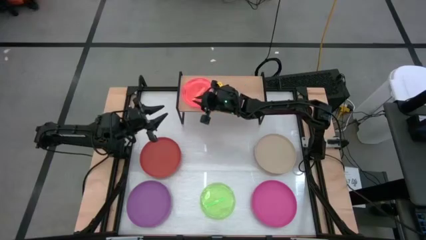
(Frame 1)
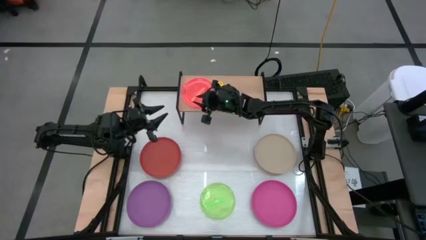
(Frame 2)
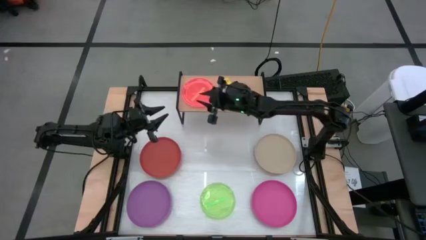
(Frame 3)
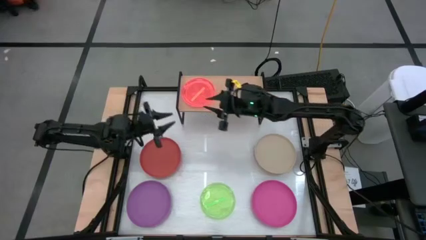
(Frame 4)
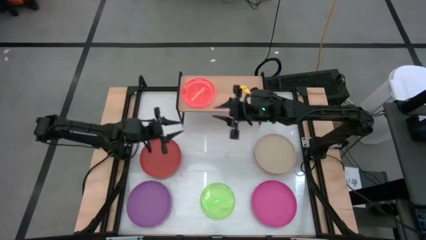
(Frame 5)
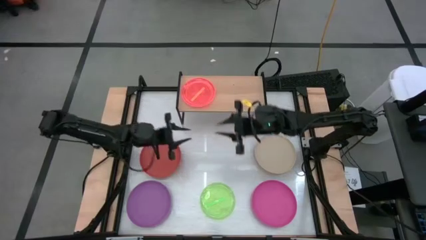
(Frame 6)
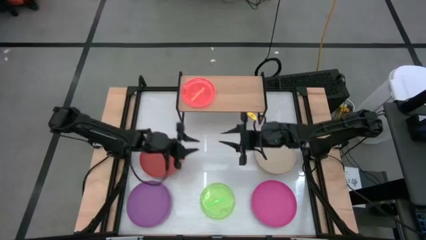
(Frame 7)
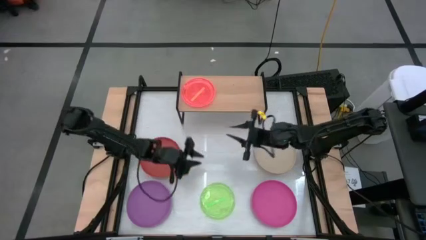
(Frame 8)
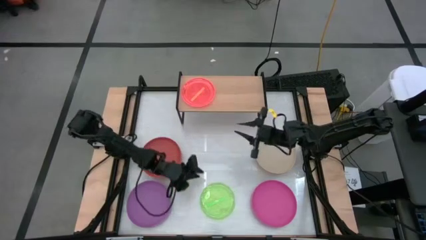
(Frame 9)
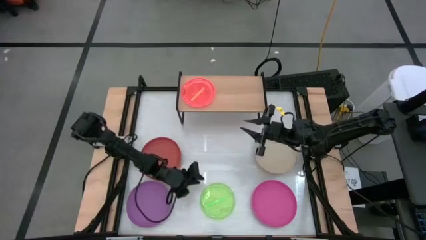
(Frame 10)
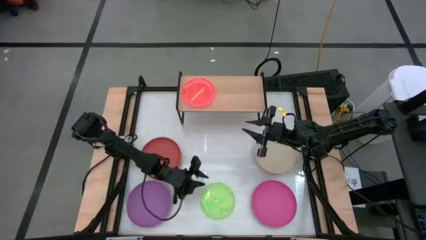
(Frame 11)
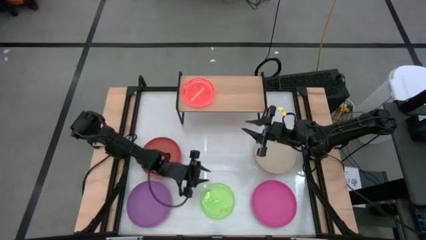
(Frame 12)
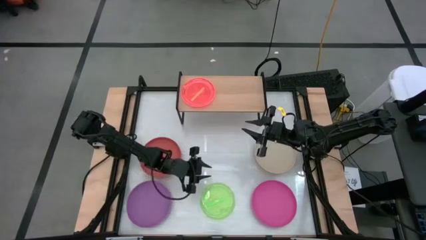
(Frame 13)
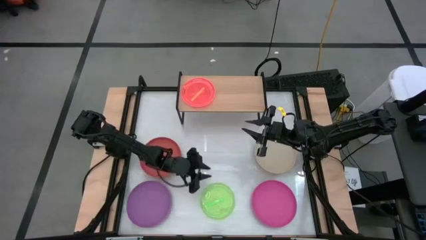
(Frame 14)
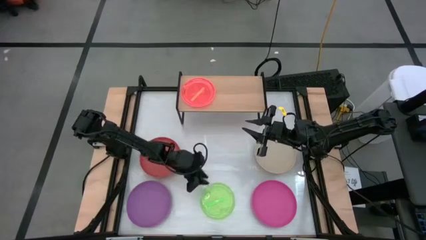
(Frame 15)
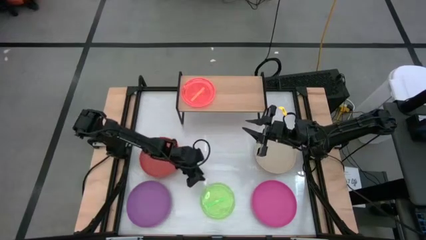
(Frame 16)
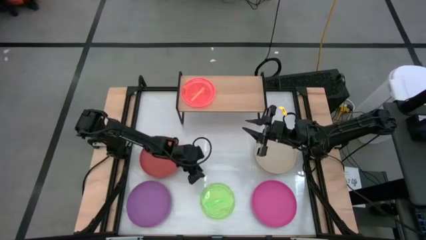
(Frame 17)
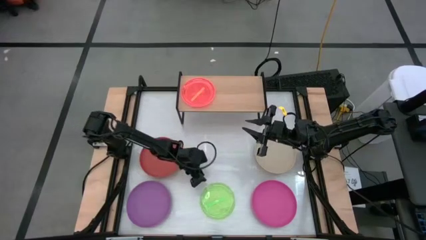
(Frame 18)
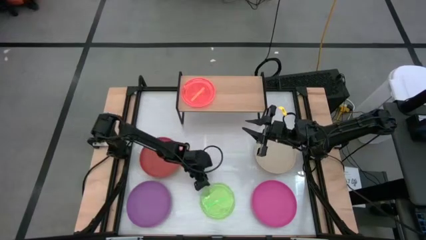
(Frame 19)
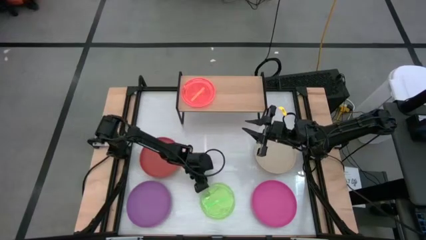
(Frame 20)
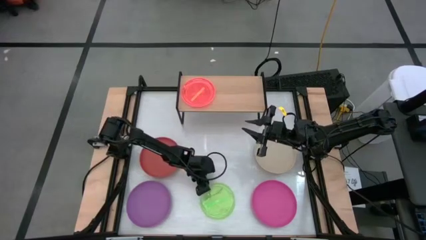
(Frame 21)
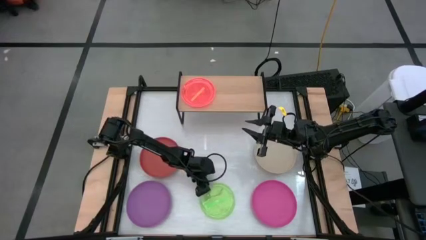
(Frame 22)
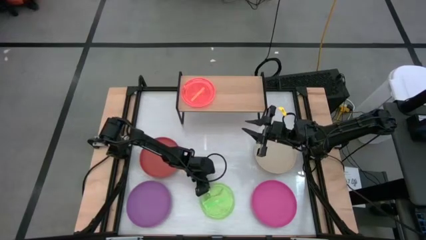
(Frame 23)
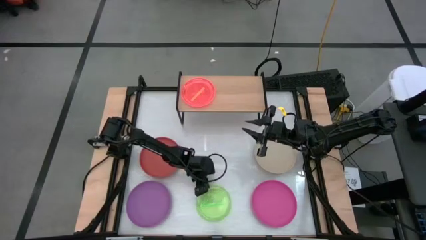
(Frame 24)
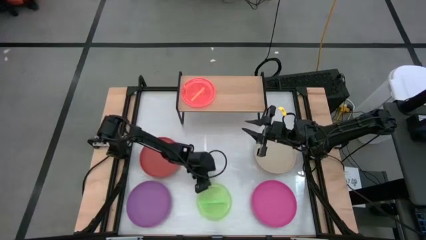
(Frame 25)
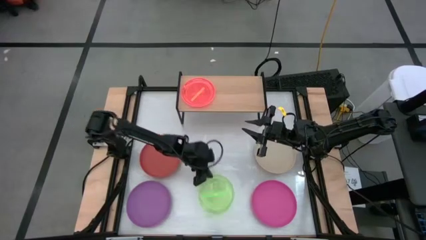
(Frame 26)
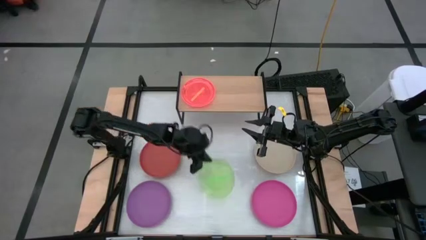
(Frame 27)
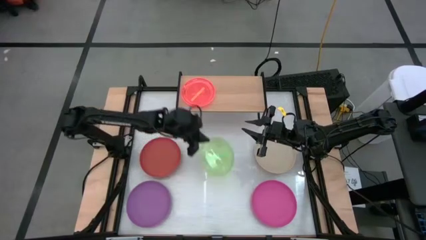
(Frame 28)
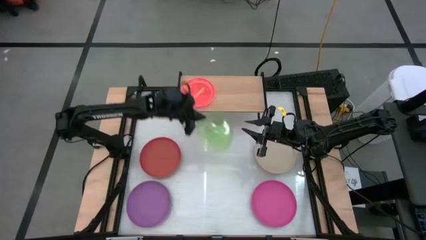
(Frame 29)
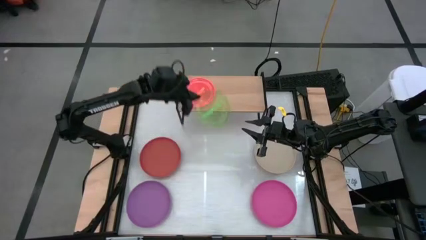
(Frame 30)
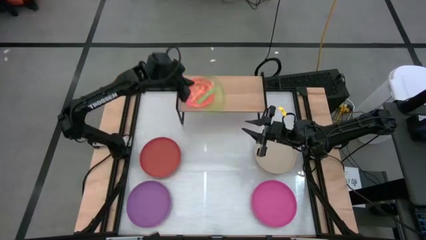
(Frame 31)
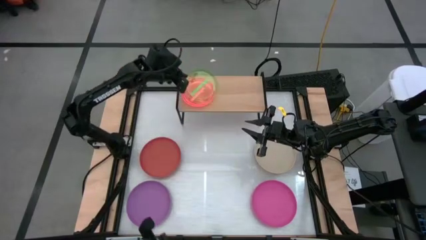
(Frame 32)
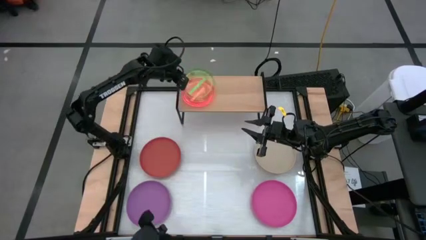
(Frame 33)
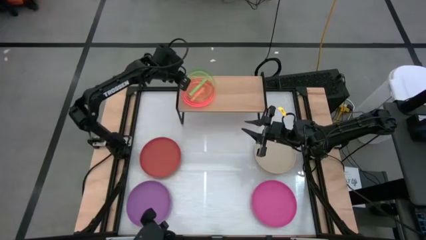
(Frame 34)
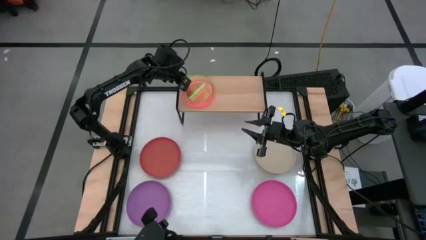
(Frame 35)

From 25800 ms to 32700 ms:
Task: Place and stack plates onto a shelf
Stack the small green plate on top of the small orange plate on the shelf

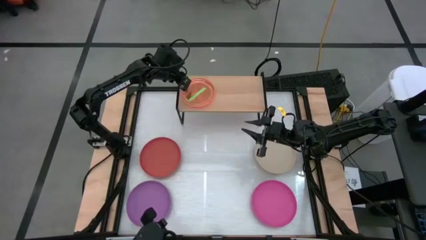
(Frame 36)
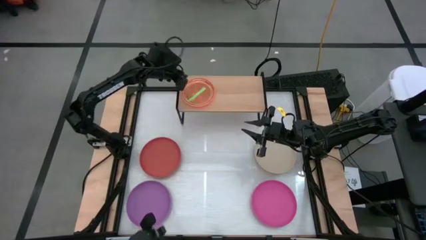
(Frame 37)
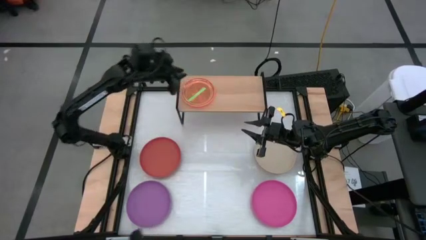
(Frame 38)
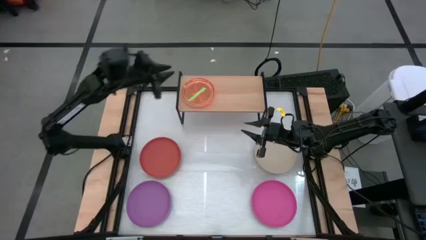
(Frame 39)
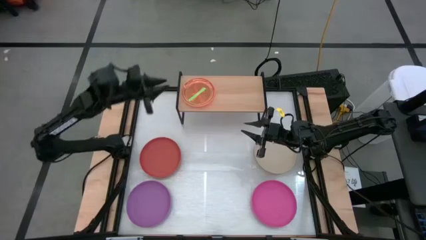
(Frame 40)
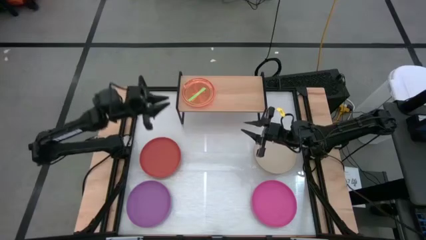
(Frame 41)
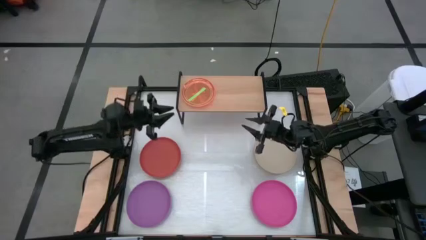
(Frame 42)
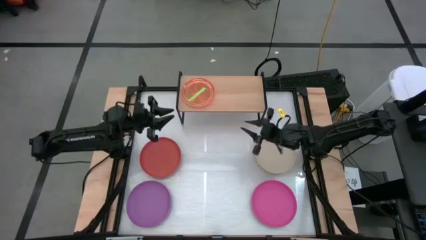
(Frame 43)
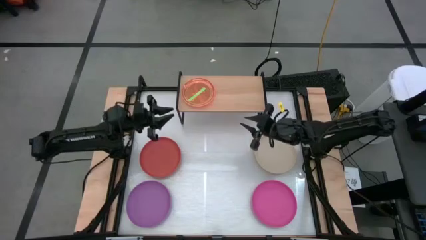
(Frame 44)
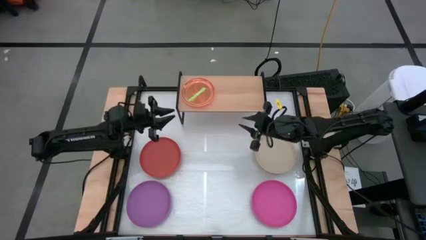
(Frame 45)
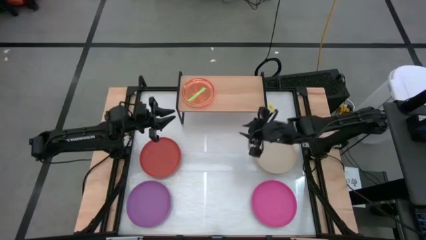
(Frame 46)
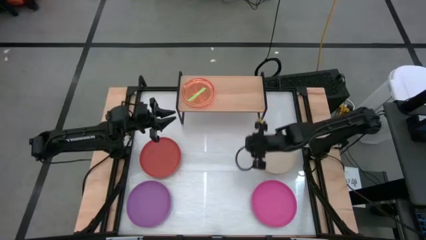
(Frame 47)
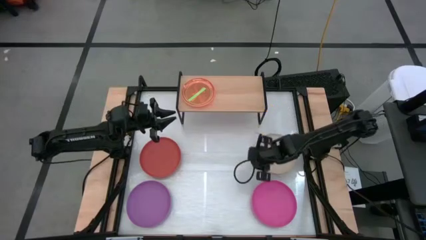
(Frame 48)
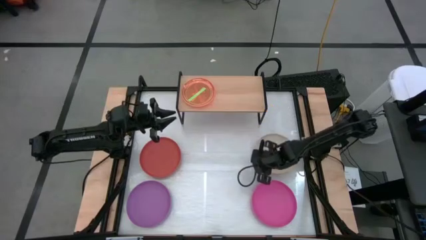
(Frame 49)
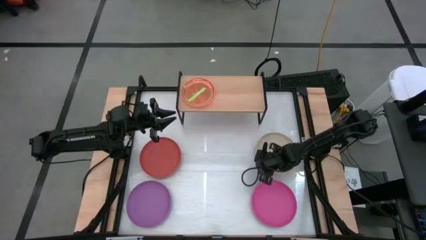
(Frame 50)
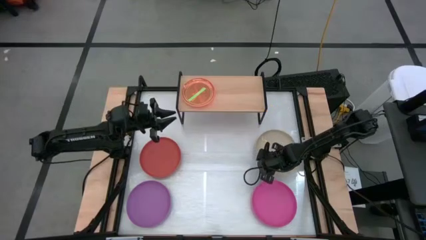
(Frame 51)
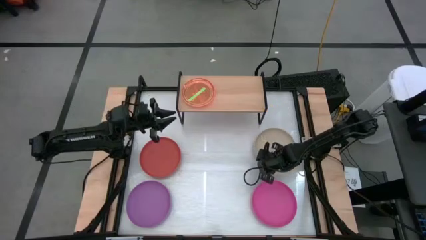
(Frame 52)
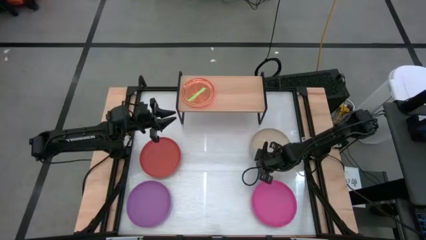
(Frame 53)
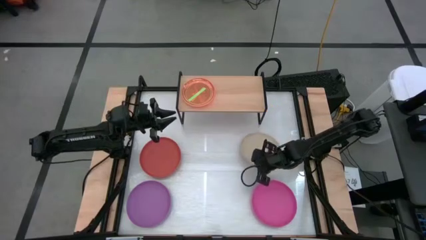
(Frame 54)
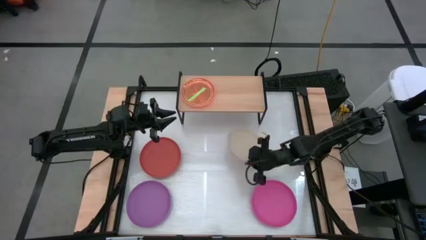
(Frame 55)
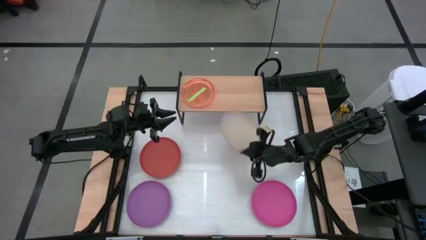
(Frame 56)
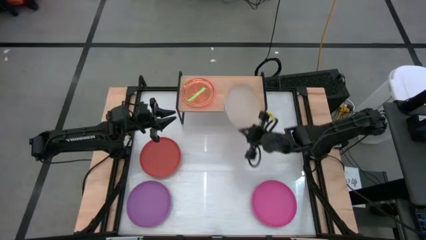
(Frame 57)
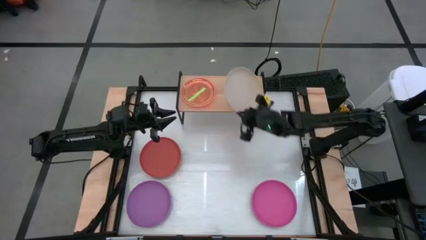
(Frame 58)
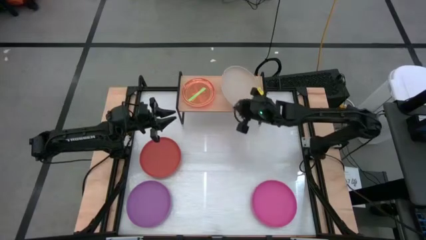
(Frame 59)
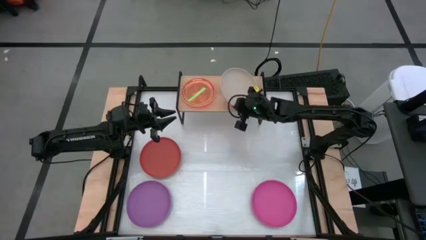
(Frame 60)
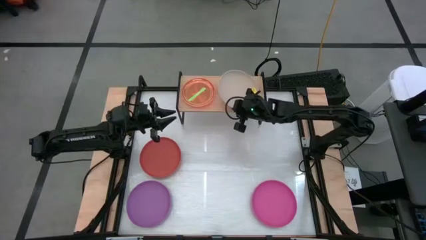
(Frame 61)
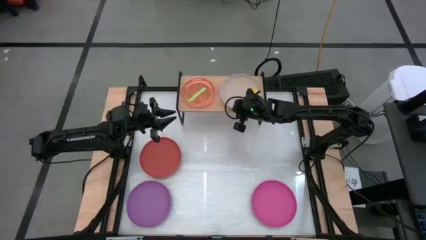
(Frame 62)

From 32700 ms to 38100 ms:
Put the big brown plate on the shelf

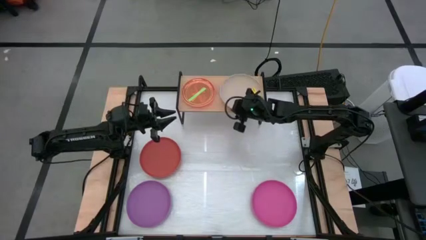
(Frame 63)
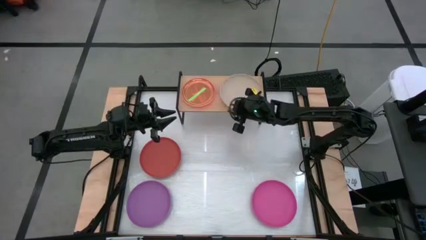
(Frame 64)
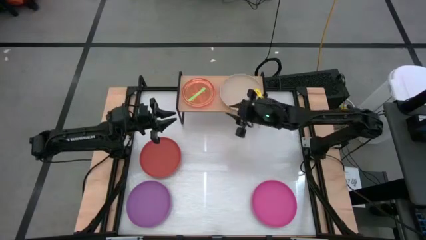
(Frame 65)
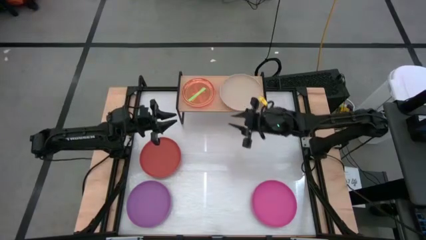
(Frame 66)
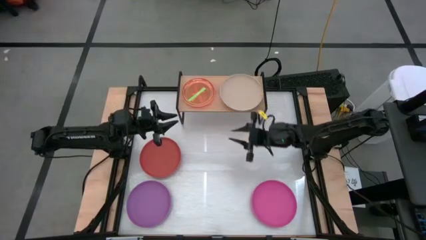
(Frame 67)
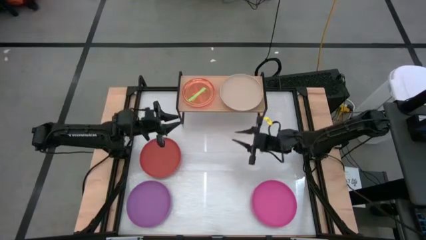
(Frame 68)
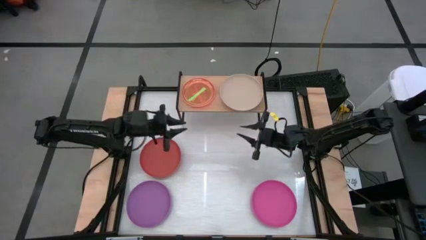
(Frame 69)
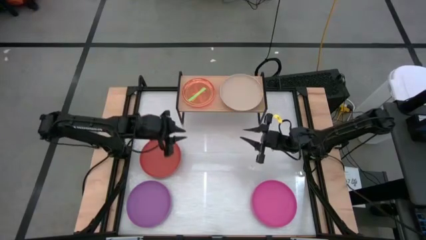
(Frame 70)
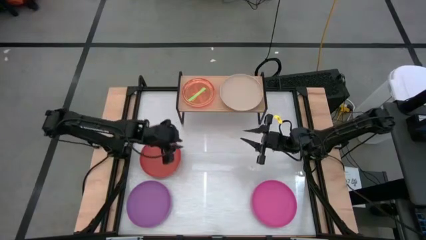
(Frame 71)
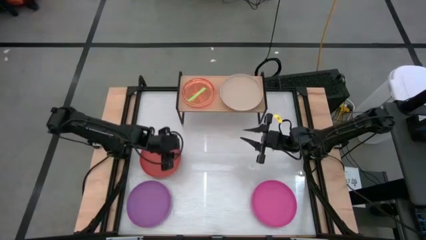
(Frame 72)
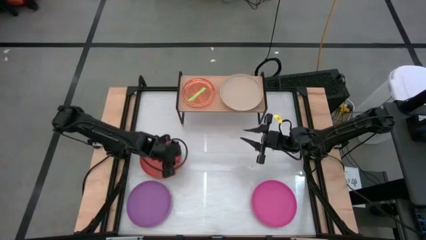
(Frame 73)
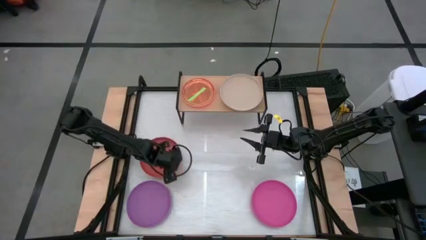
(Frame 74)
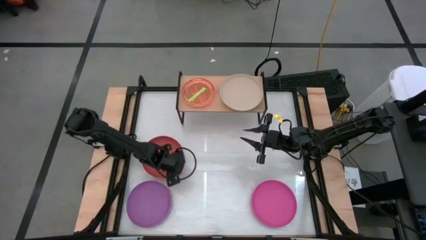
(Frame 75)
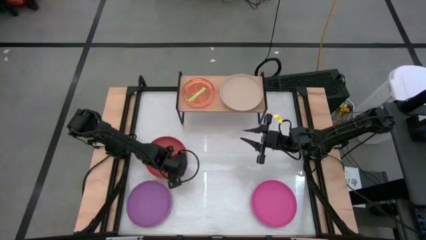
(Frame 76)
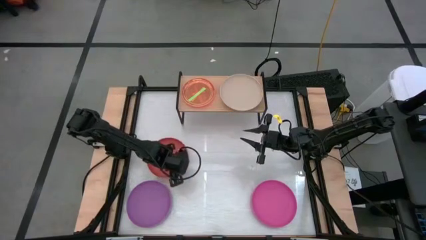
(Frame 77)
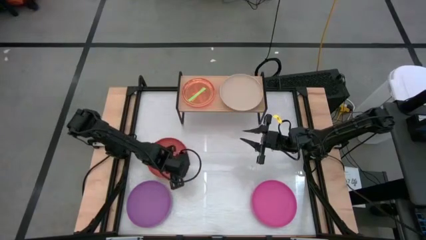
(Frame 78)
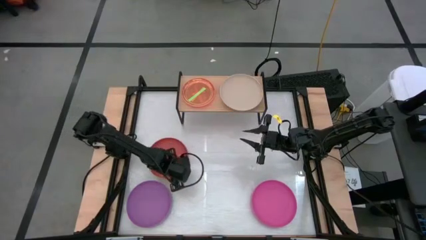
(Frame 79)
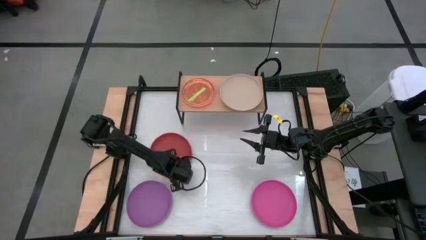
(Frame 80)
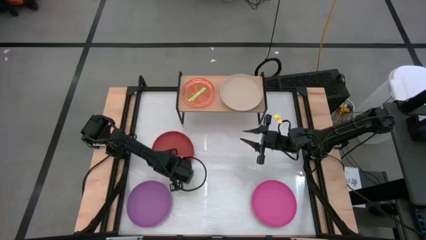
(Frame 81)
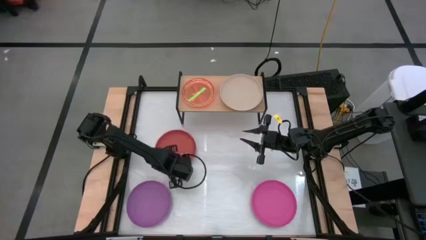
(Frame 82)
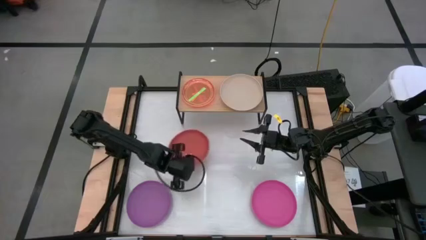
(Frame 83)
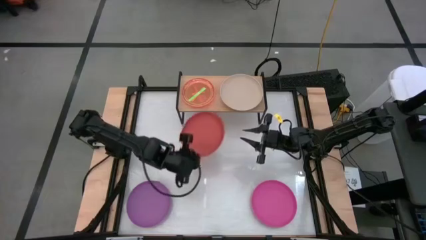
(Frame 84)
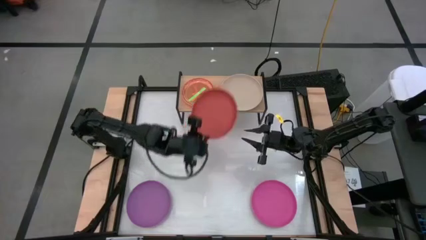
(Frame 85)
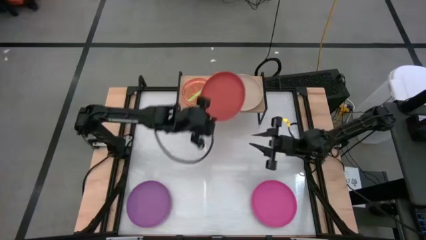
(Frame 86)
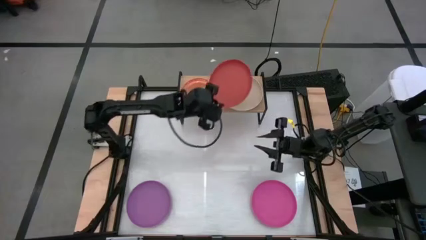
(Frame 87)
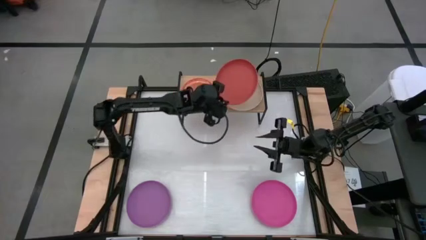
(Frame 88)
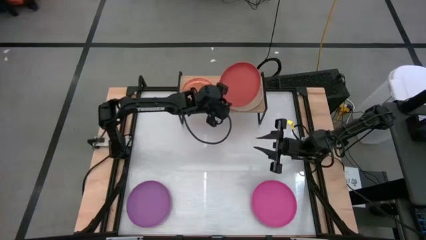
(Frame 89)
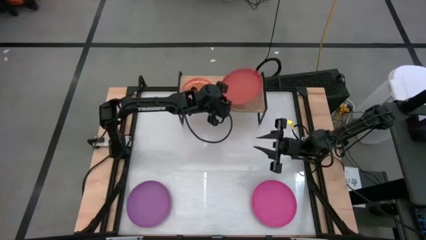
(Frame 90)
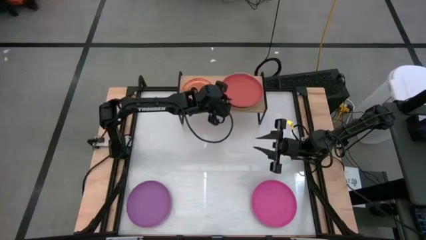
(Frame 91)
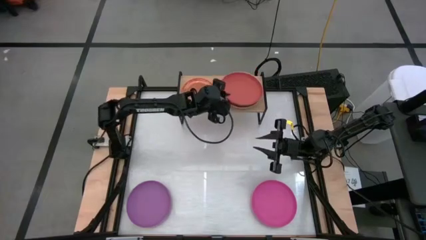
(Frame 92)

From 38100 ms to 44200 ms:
Stack the big red plate on the big brown plate on the shelf
